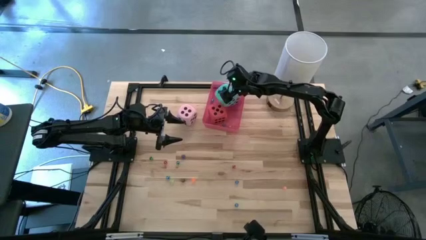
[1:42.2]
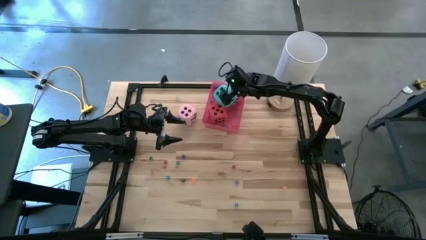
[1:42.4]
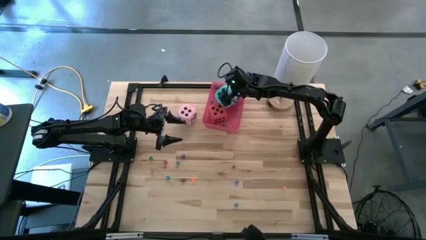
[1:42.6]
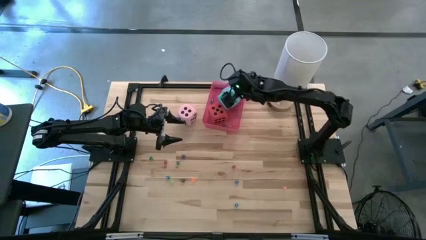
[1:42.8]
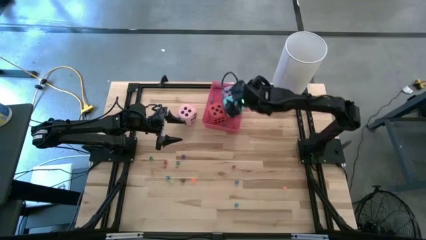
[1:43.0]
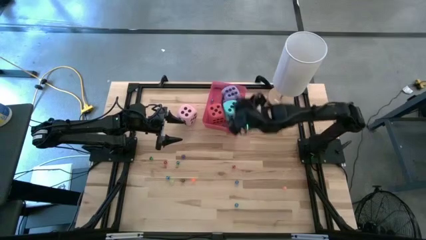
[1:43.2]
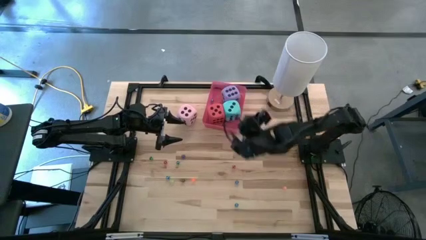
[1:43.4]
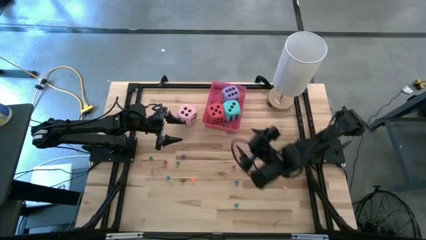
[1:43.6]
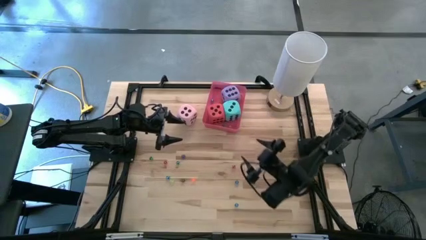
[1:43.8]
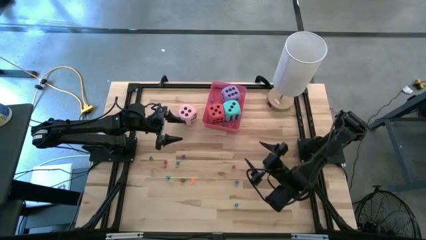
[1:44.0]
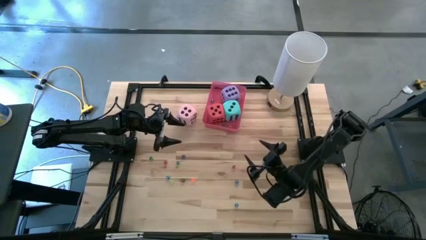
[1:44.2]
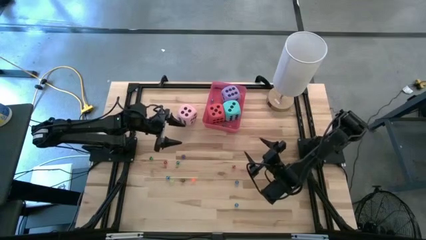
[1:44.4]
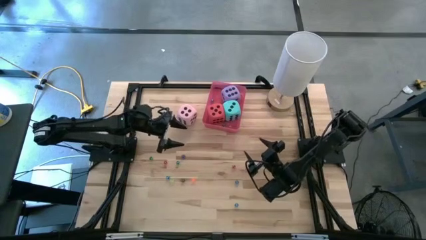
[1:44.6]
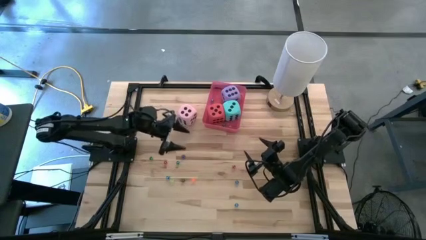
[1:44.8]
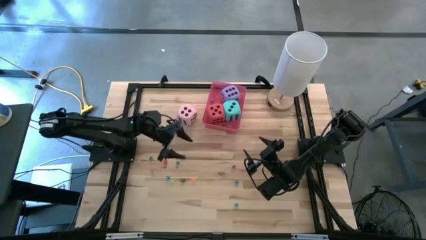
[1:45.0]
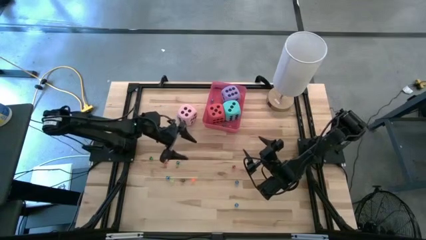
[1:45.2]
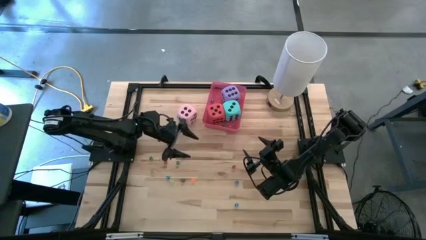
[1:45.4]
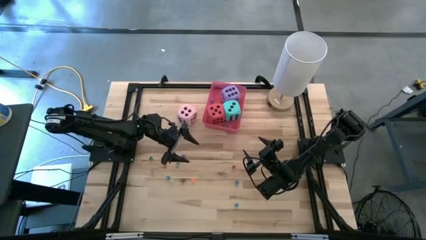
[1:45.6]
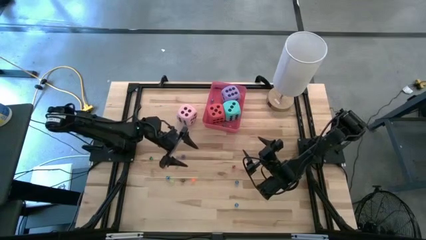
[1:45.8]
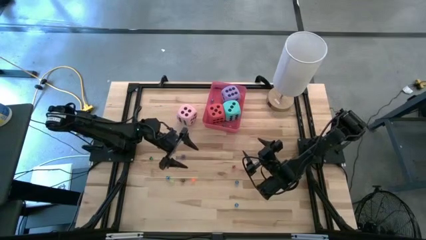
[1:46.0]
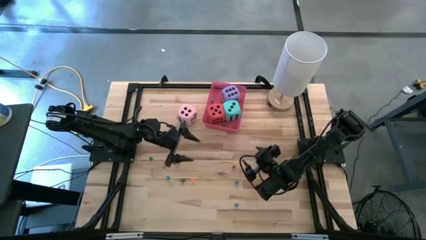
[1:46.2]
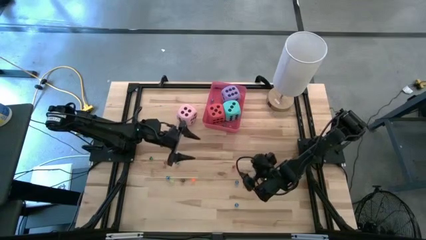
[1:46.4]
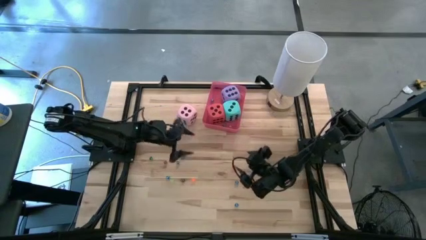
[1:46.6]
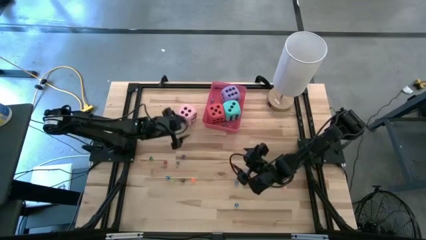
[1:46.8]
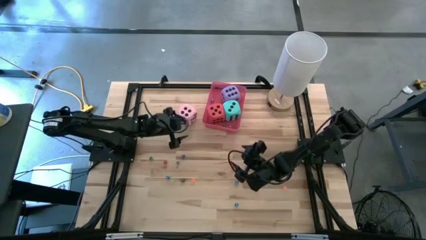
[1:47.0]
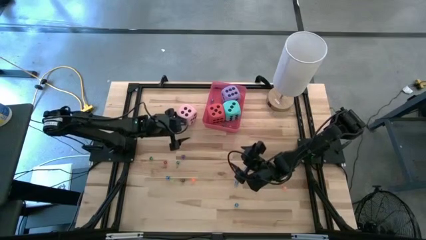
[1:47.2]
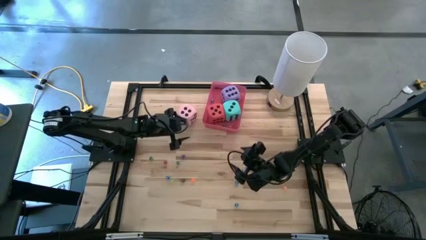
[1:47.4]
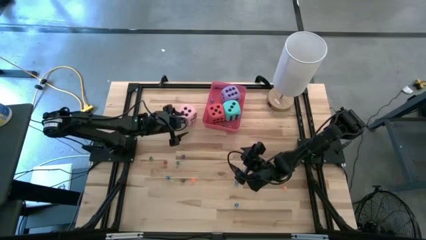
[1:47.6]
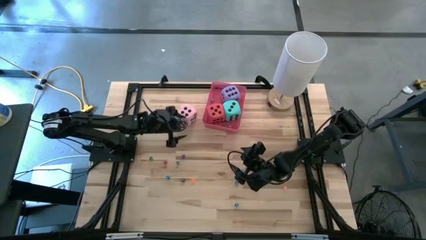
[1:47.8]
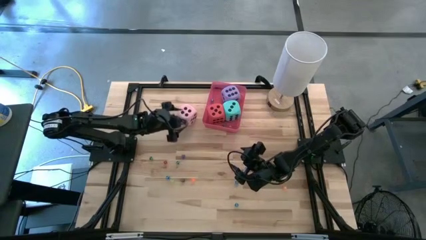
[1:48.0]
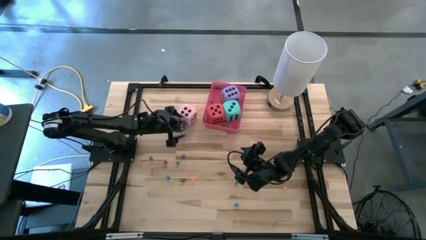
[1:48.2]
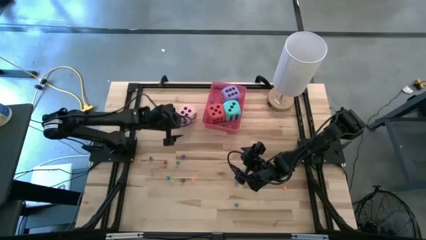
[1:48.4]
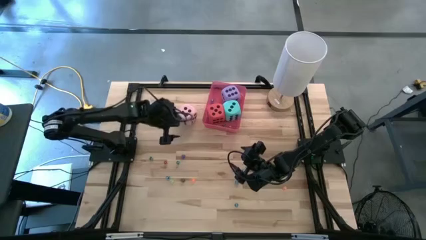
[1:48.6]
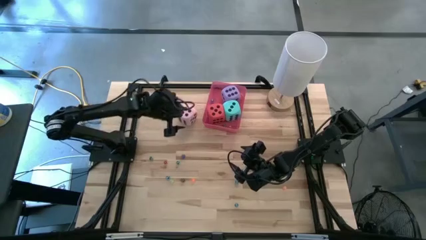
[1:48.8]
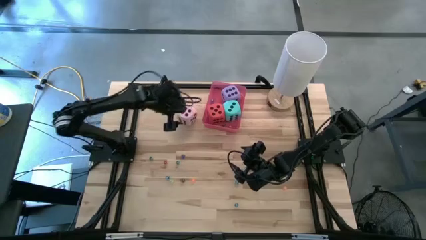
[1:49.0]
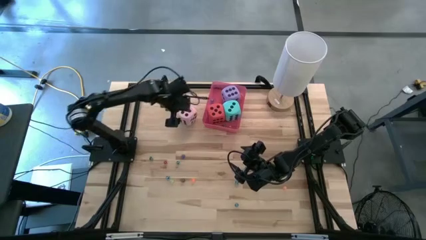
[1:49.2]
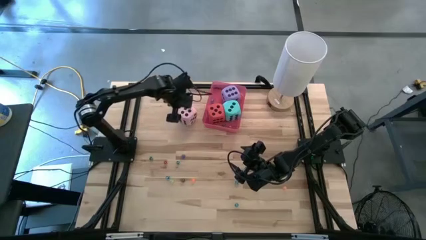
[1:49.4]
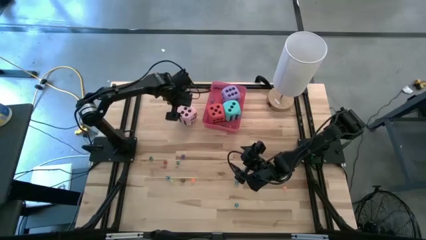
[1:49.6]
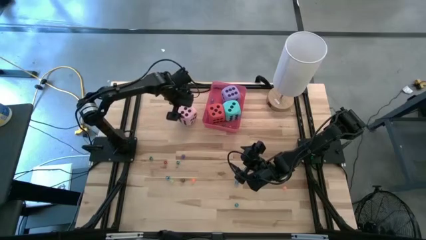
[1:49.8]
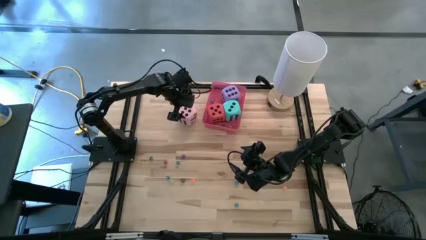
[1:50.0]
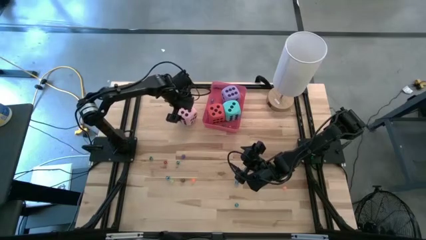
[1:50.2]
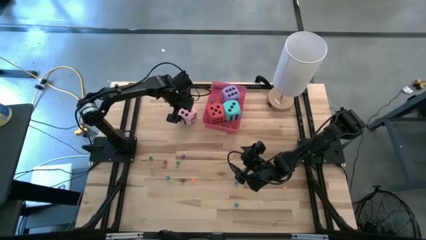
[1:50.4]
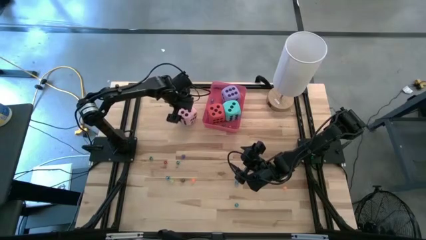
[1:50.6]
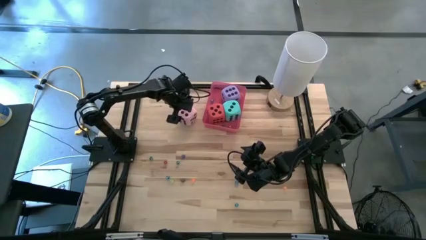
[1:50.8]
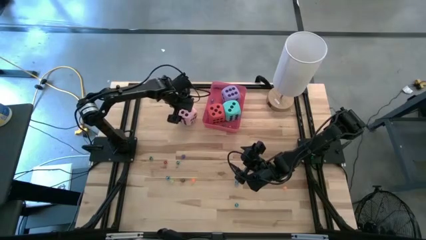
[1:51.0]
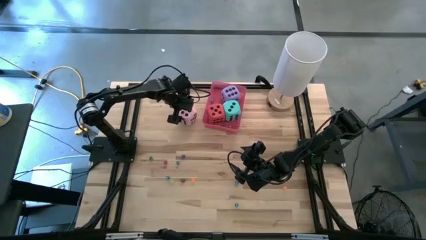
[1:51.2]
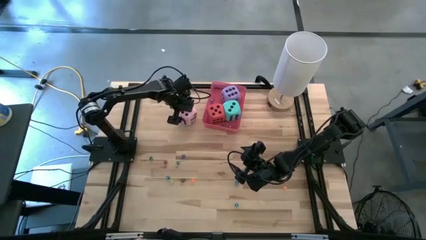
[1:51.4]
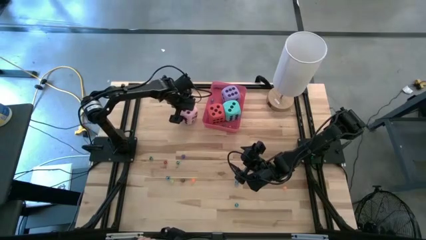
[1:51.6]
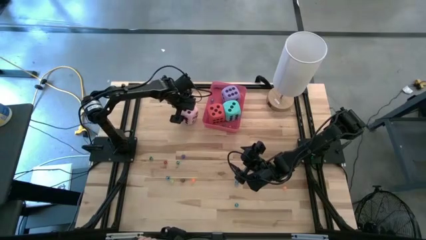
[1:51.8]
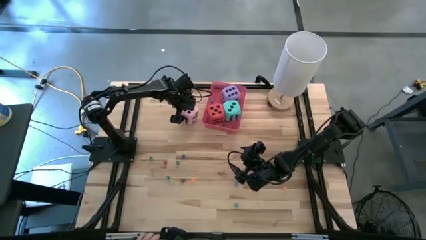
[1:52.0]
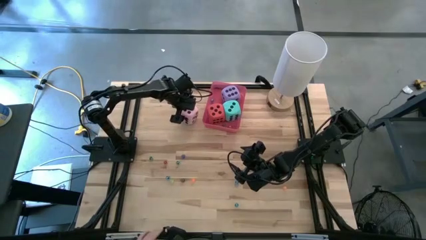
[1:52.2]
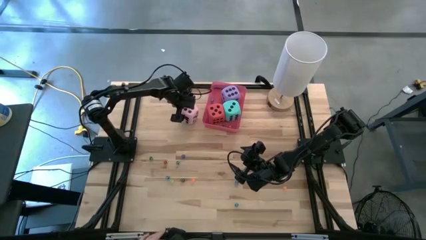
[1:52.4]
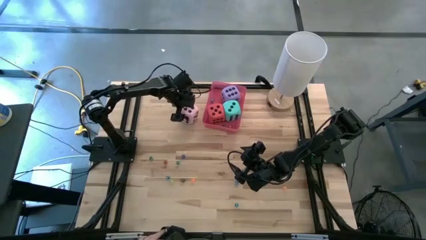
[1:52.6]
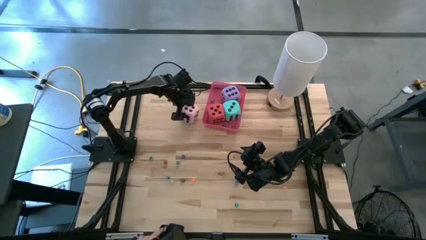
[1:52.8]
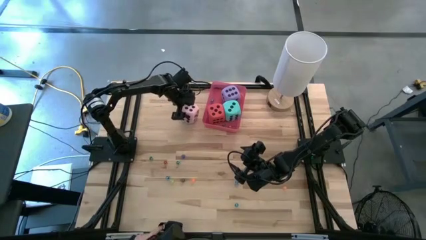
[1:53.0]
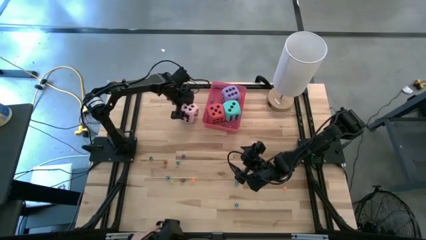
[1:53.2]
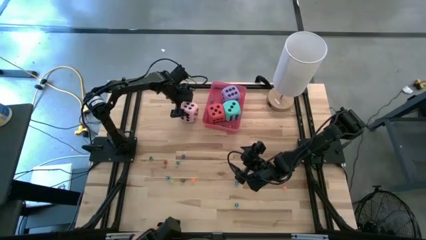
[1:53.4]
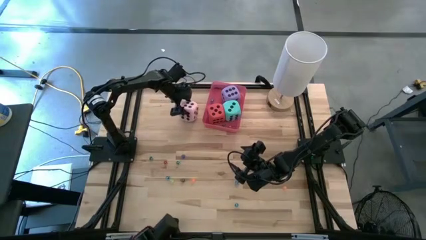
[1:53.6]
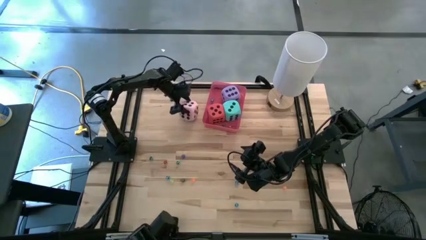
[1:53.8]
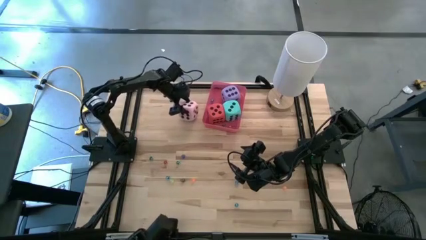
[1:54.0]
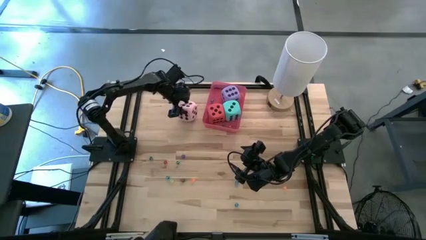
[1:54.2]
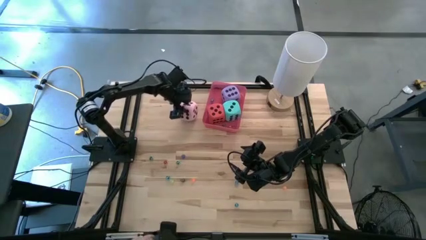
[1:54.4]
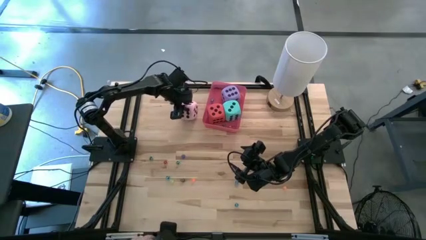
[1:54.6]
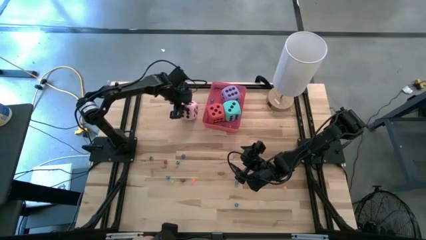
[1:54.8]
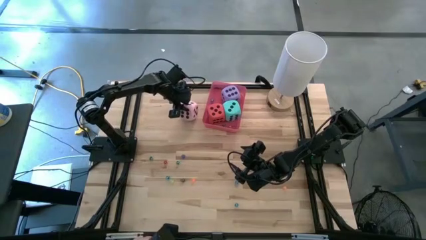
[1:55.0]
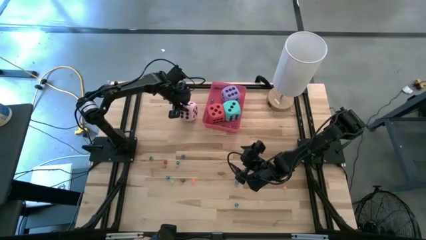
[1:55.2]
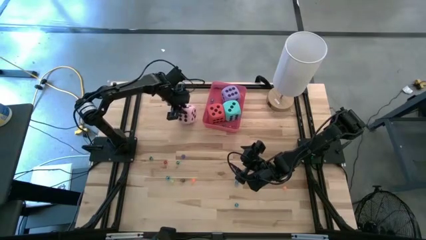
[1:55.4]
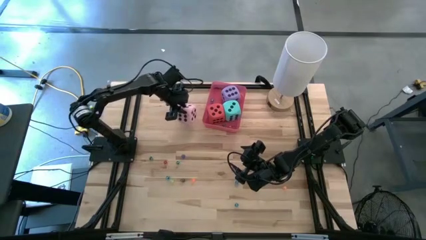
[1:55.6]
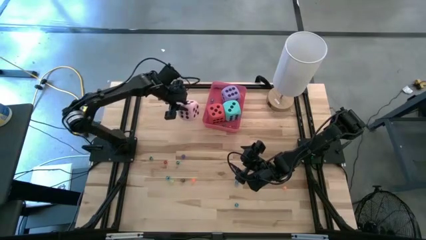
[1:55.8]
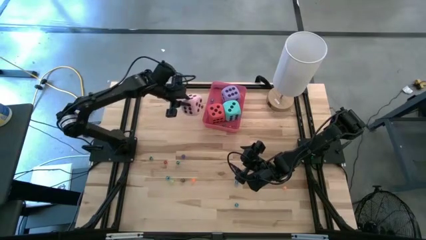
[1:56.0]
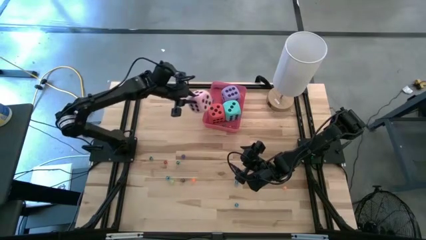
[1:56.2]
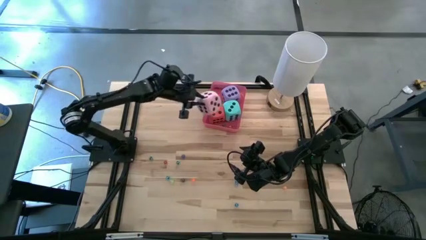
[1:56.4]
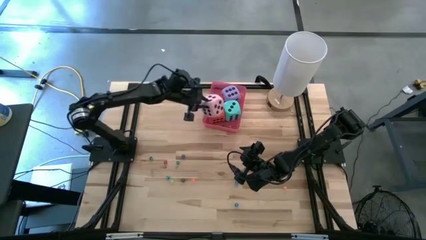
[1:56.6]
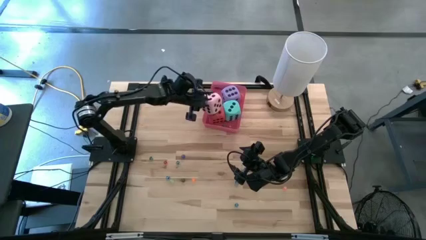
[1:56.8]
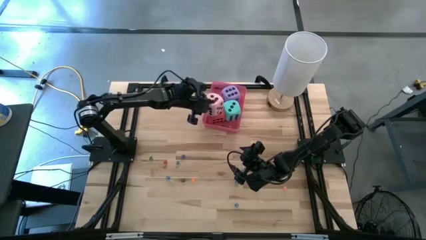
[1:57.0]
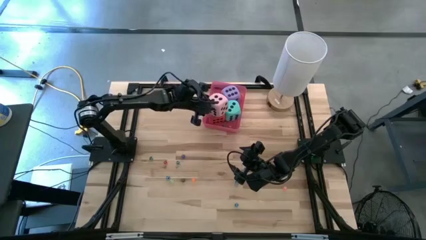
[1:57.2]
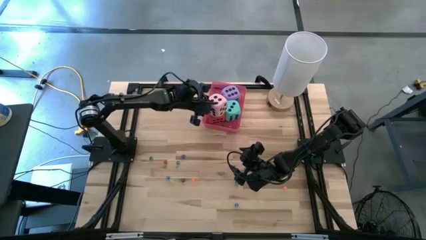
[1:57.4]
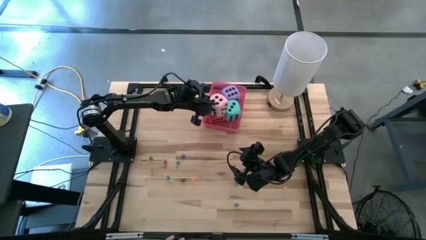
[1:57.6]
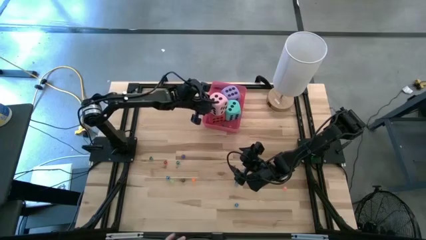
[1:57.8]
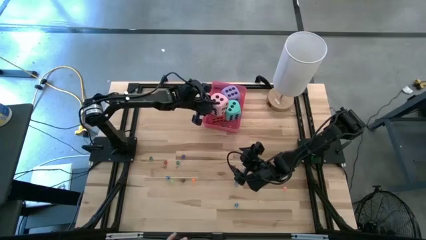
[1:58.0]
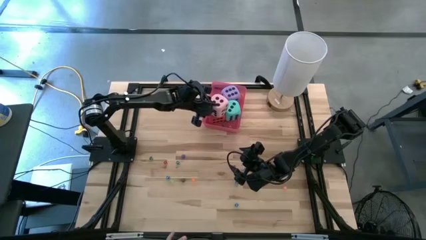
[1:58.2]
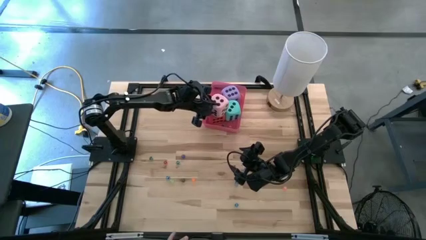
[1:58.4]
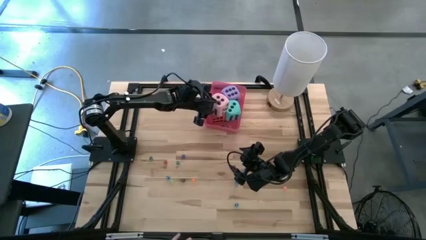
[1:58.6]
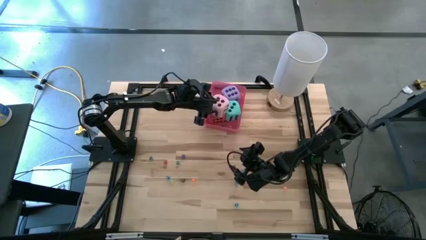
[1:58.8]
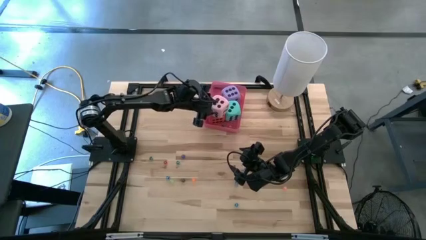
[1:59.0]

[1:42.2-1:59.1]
Task: Pick & Place Dice
Put the large pink dice into the bin
